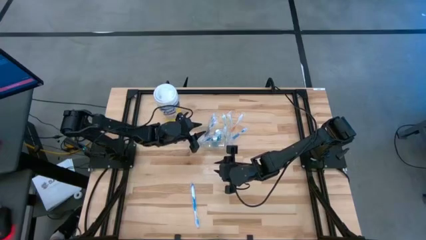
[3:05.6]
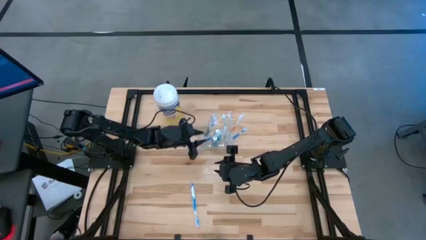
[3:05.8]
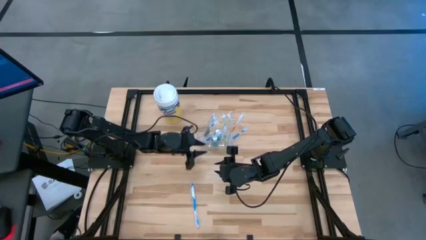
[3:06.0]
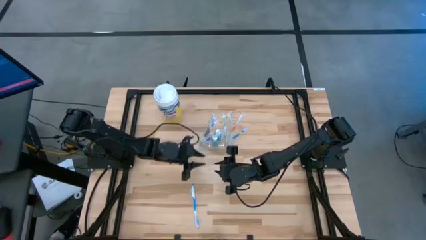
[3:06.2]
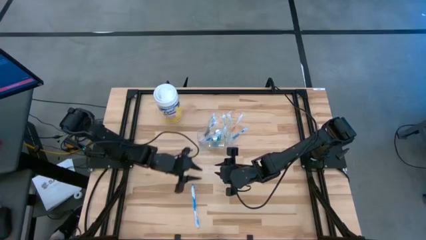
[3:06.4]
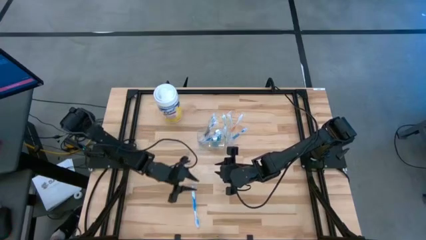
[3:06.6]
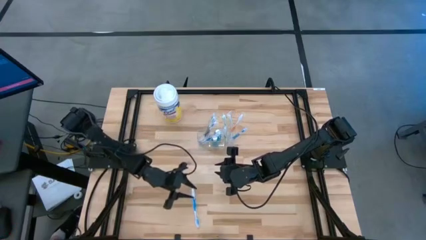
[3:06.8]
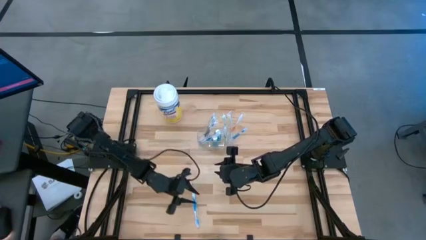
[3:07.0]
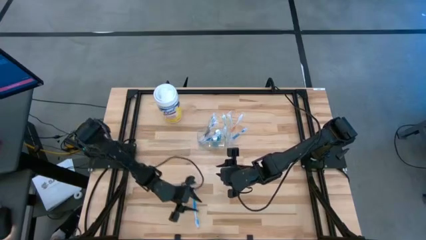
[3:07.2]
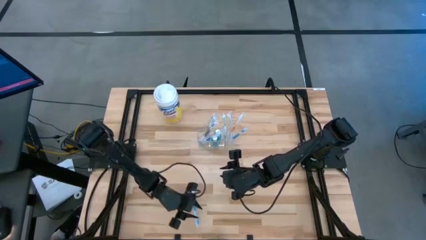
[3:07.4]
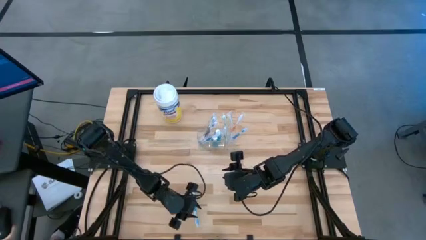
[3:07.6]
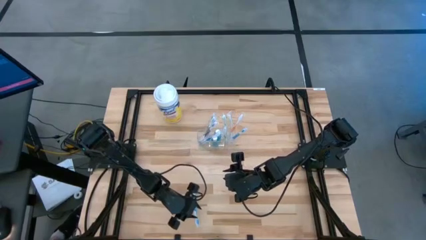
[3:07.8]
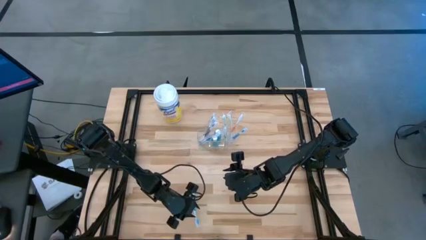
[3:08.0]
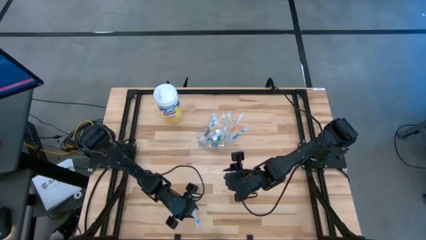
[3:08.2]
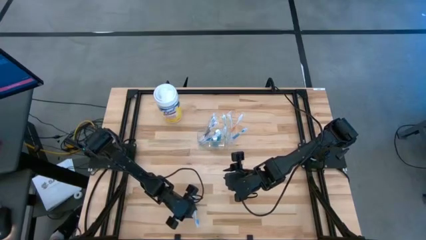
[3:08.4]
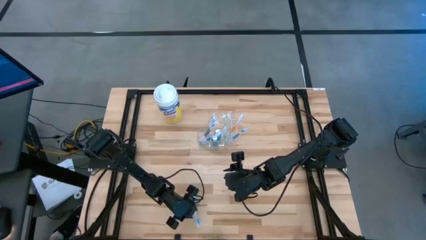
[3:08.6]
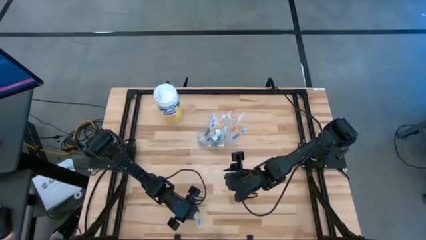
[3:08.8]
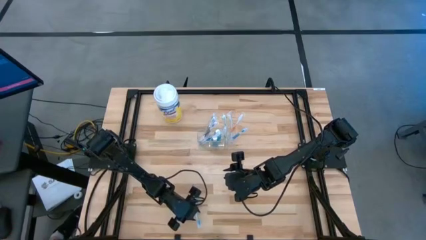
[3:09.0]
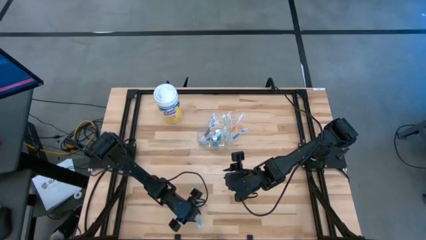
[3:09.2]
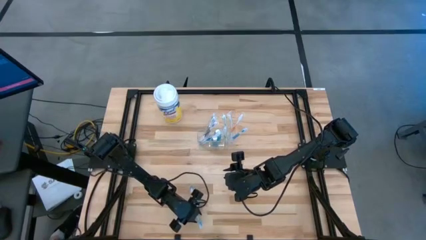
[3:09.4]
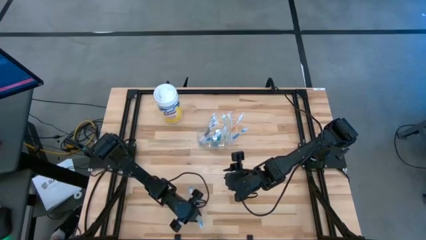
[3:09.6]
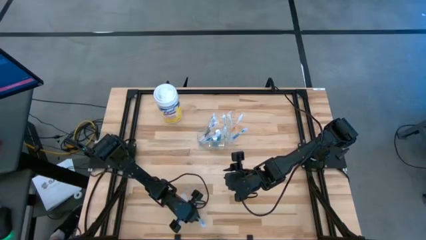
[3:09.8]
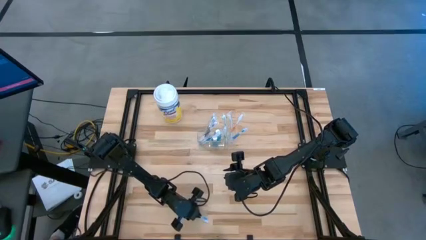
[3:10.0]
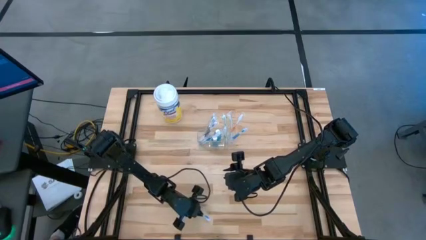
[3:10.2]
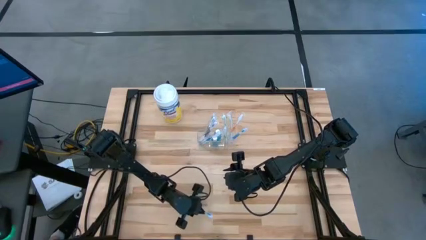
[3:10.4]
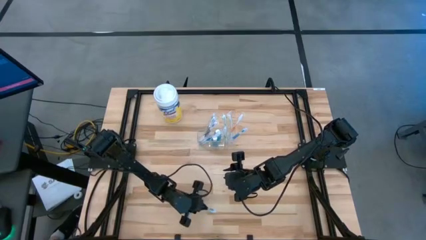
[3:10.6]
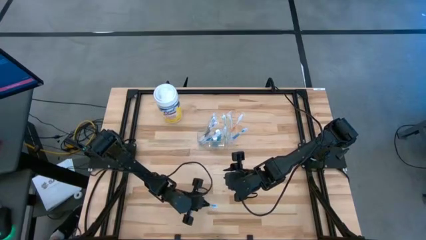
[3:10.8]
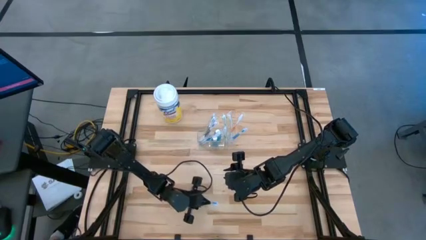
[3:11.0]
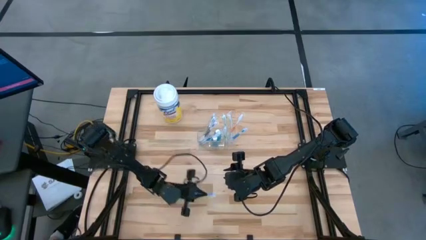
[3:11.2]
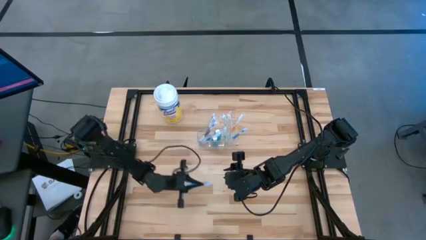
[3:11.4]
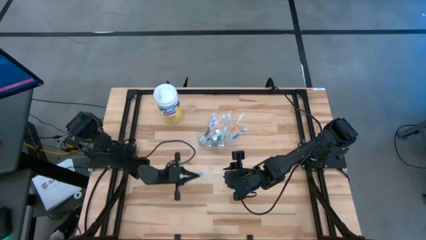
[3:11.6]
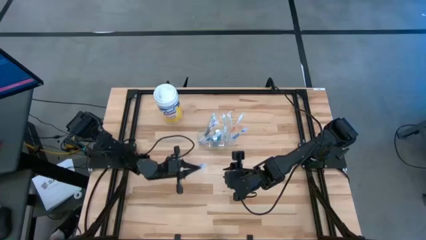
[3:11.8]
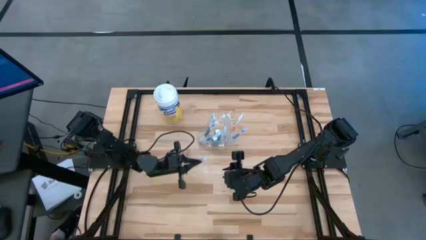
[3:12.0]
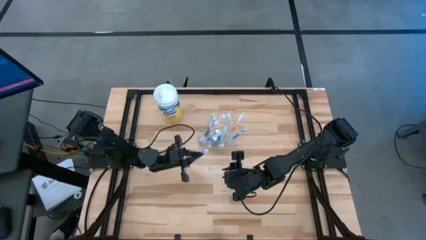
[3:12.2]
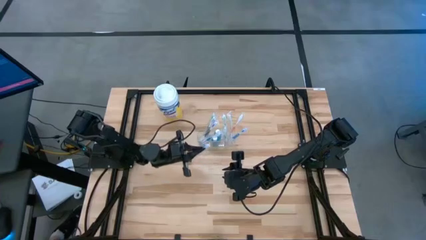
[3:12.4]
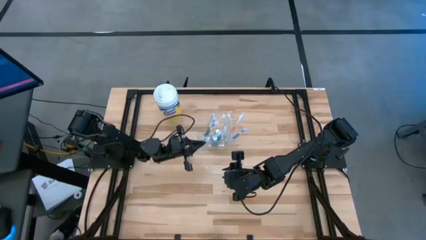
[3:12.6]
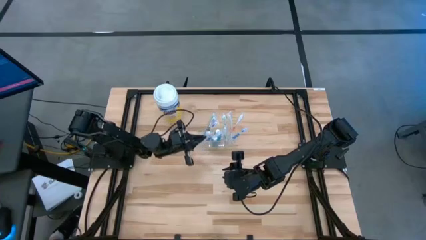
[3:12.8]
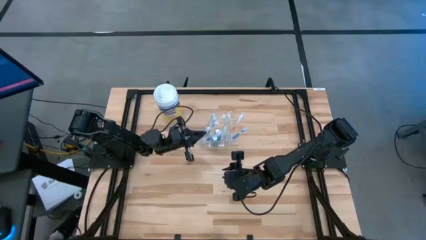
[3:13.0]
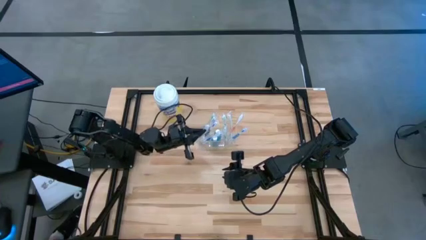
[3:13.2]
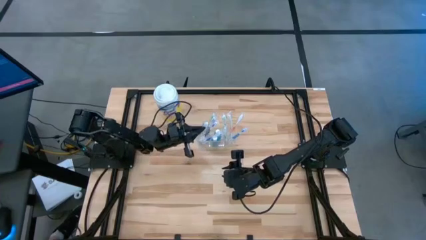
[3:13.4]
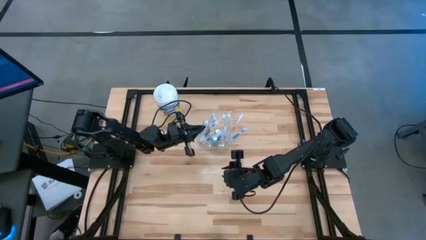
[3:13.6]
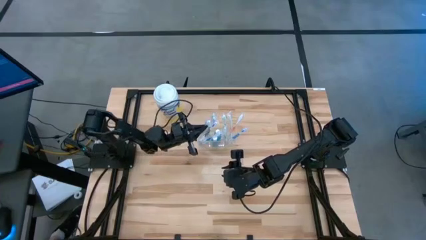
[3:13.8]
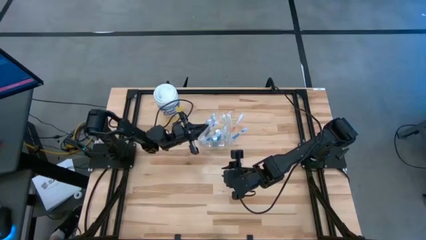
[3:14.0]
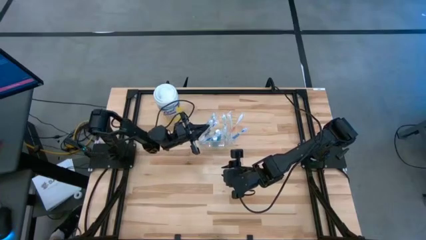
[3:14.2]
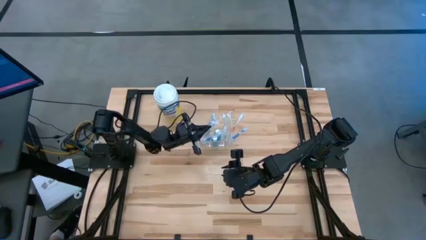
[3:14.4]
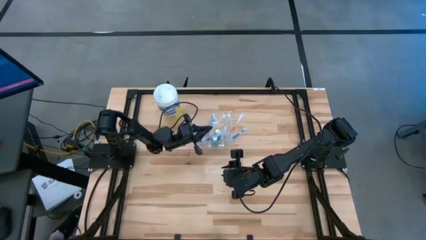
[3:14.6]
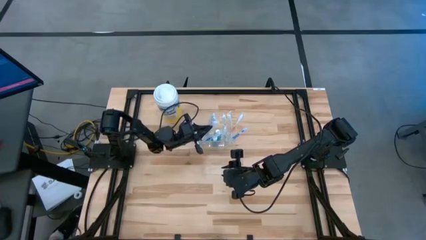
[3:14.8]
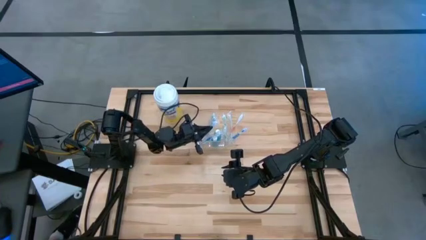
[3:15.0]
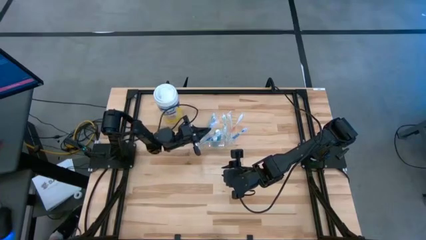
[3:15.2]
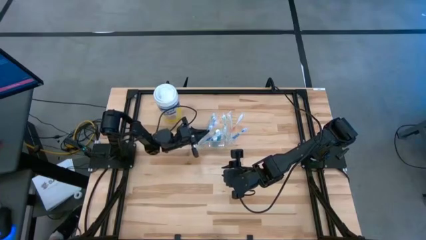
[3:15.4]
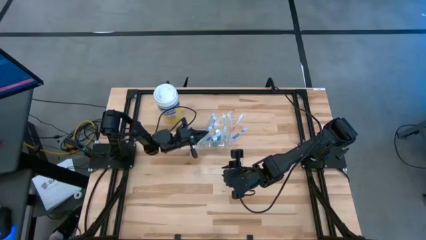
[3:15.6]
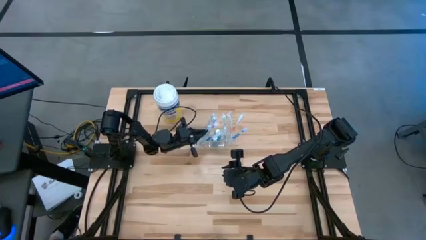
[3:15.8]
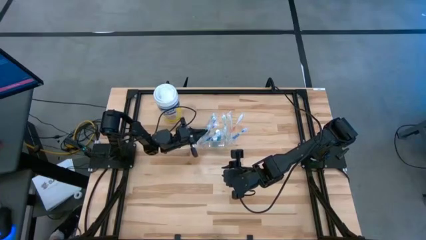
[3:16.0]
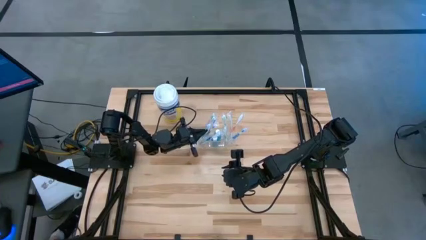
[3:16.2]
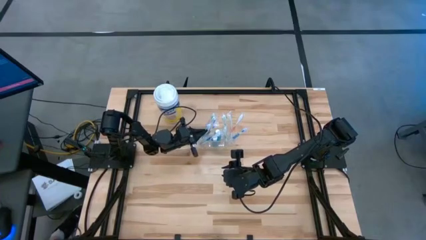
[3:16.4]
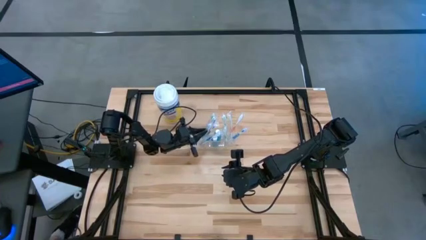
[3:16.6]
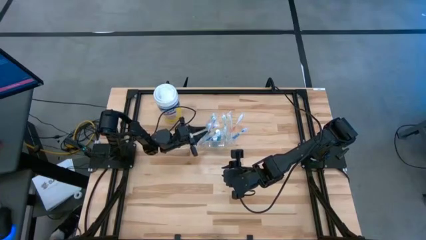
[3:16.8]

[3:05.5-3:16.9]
Task: Pick & Place toothbrushing station
Put the blue toothbrush into the transparent organizer

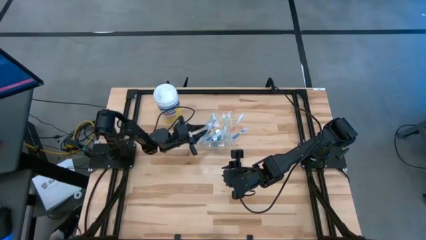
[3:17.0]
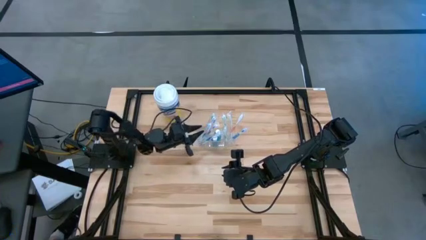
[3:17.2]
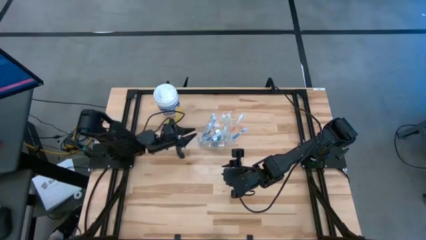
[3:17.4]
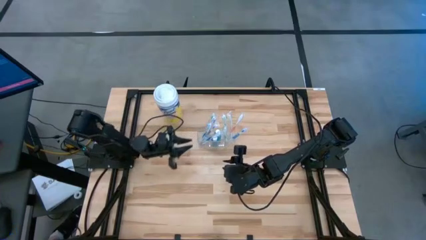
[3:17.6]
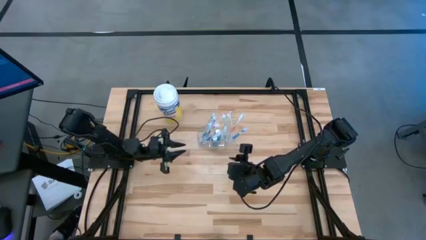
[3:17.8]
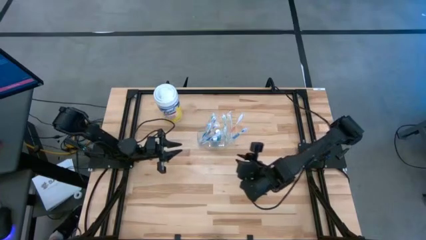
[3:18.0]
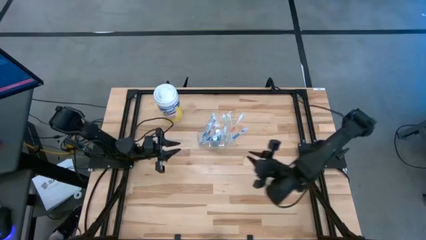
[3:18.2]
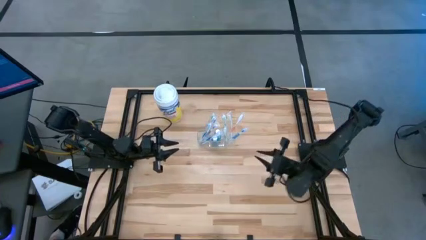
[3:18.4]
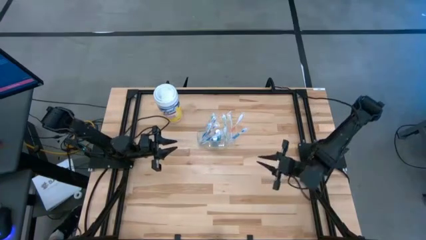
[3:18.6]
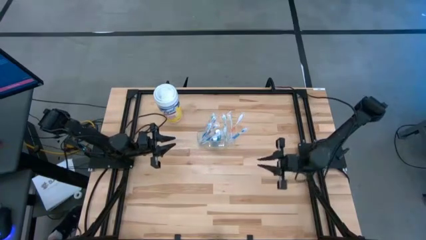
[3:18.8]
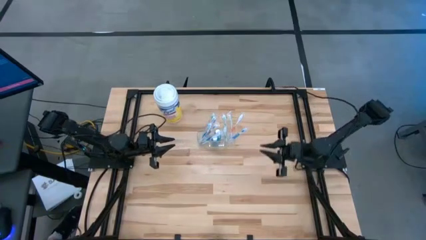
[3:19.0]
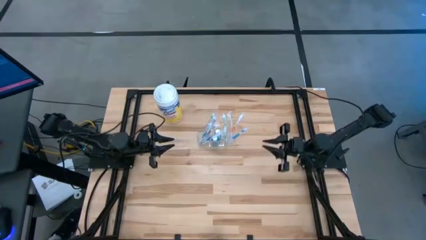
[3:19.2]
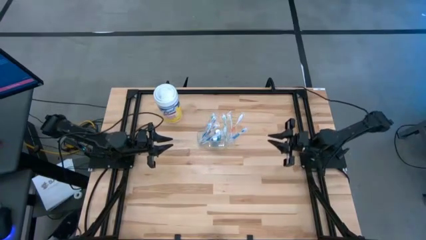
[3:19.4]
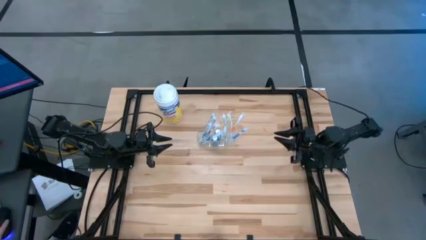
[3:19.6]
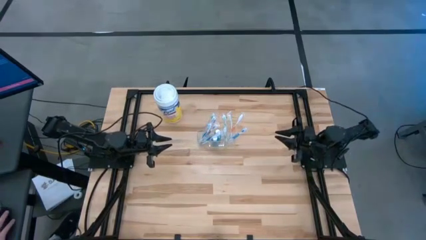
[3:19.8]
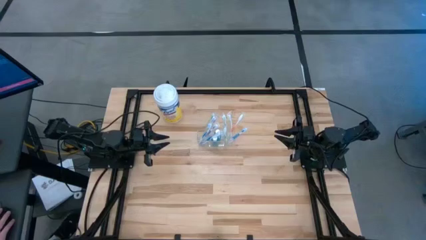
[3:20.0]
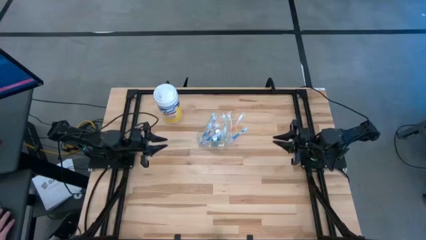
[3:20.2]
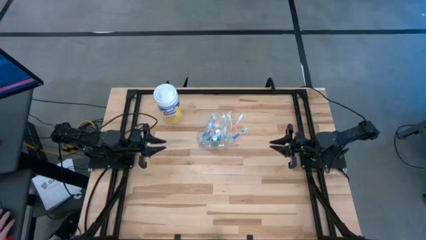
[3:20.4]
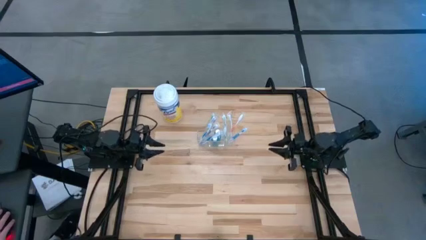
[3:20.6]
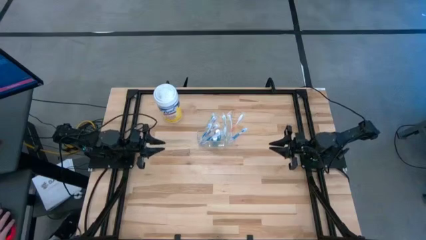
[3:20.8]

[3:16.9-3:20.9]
Return to Home Position
